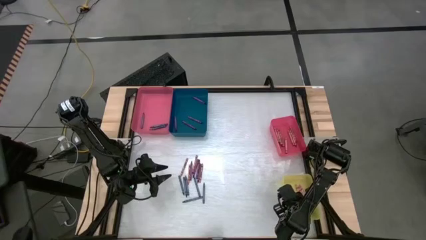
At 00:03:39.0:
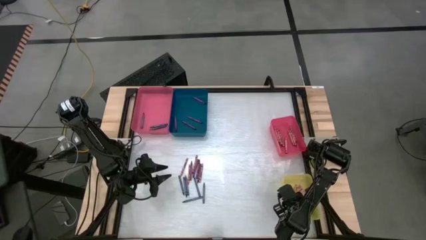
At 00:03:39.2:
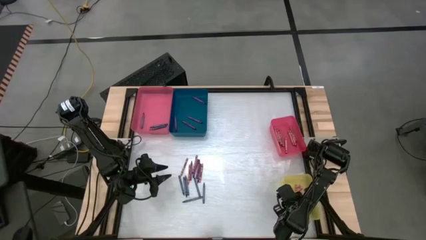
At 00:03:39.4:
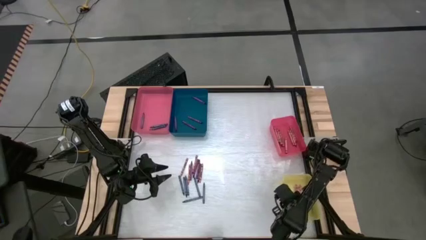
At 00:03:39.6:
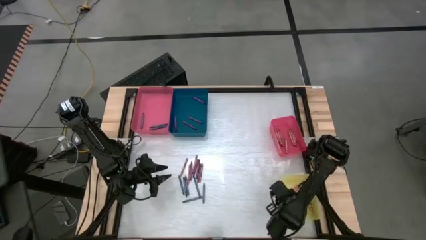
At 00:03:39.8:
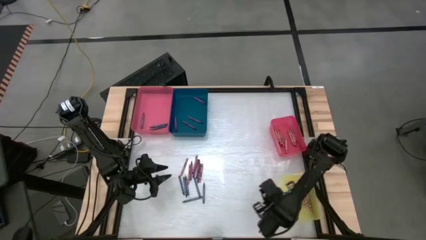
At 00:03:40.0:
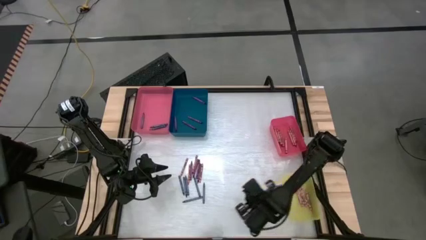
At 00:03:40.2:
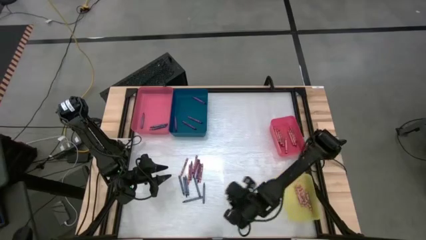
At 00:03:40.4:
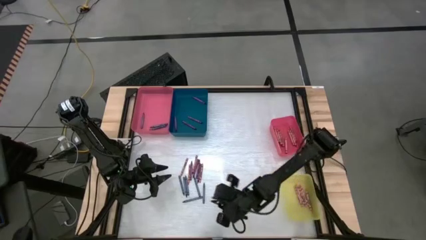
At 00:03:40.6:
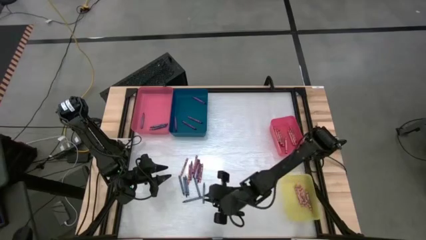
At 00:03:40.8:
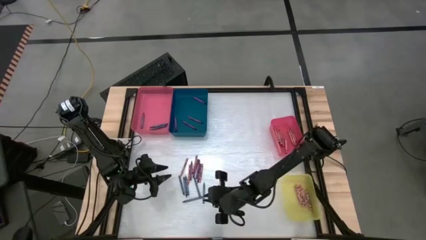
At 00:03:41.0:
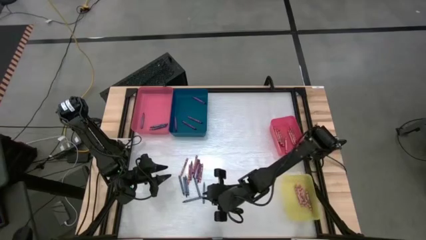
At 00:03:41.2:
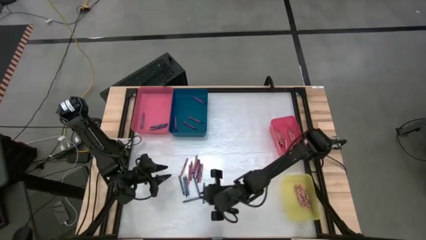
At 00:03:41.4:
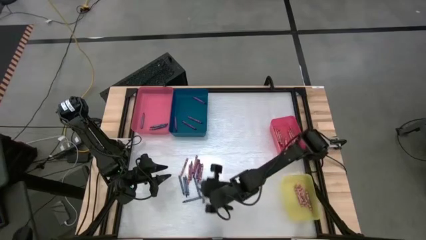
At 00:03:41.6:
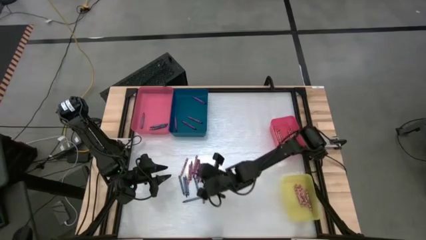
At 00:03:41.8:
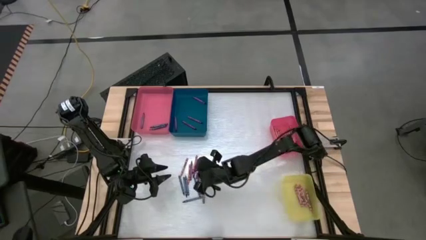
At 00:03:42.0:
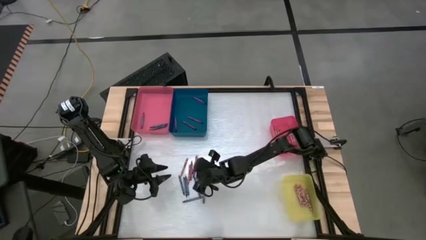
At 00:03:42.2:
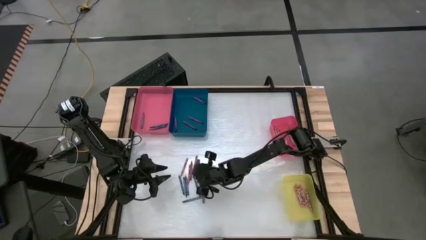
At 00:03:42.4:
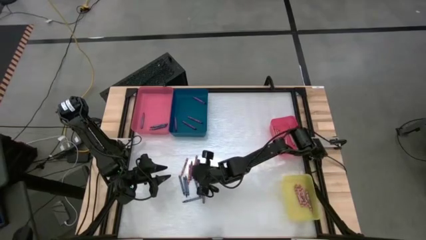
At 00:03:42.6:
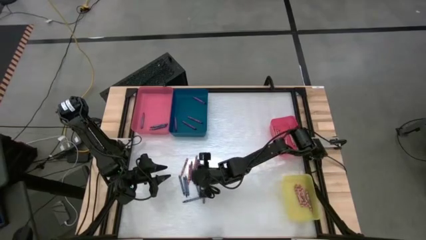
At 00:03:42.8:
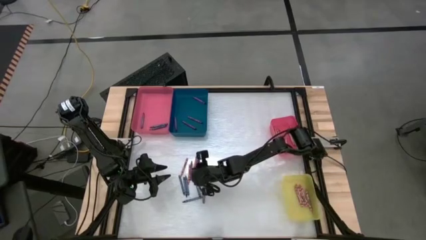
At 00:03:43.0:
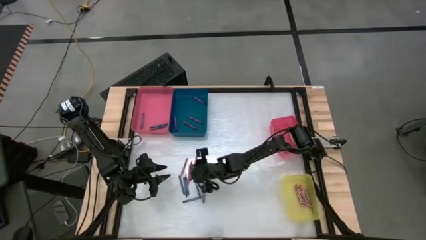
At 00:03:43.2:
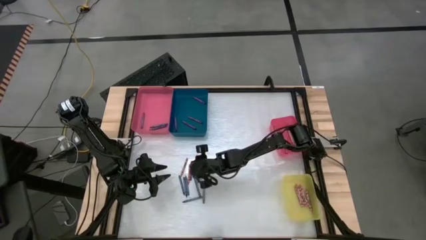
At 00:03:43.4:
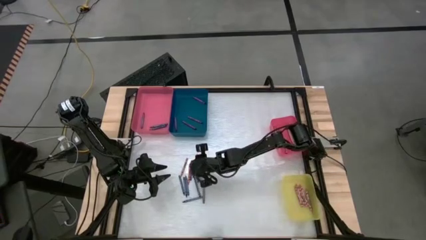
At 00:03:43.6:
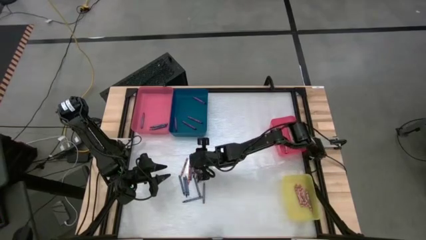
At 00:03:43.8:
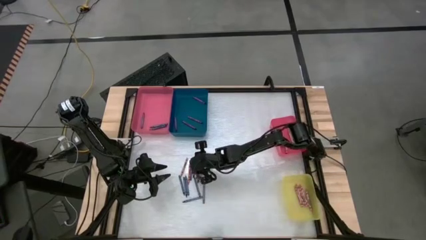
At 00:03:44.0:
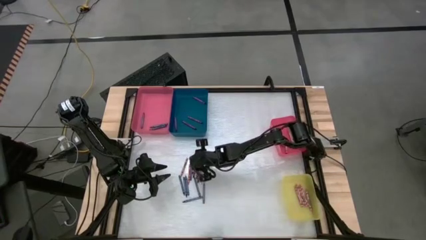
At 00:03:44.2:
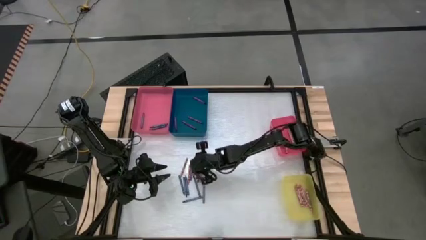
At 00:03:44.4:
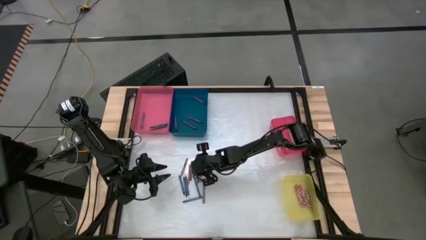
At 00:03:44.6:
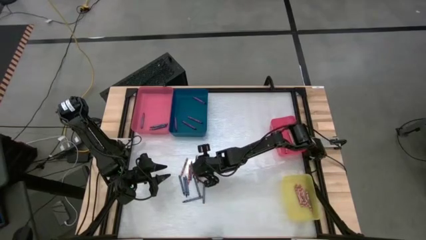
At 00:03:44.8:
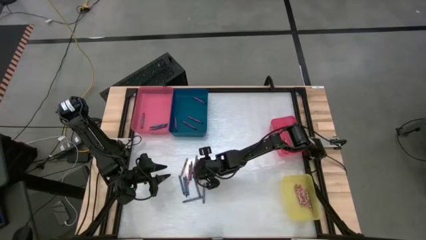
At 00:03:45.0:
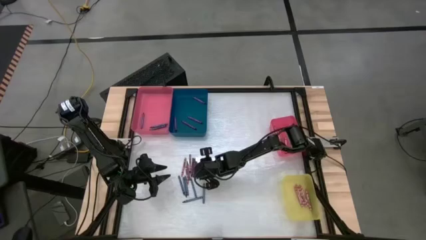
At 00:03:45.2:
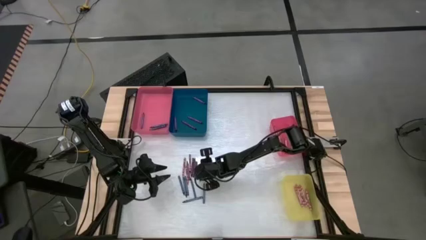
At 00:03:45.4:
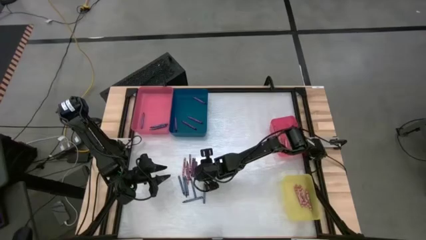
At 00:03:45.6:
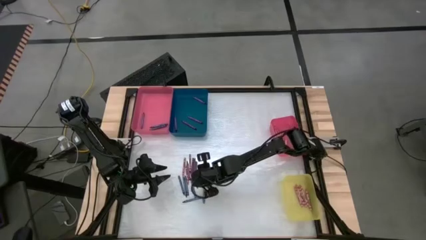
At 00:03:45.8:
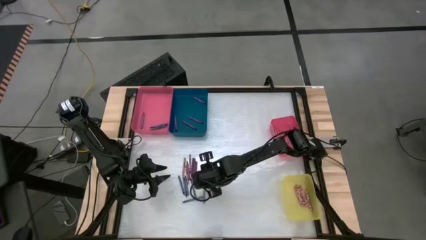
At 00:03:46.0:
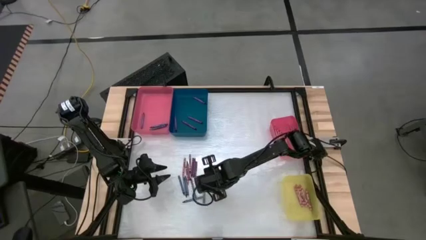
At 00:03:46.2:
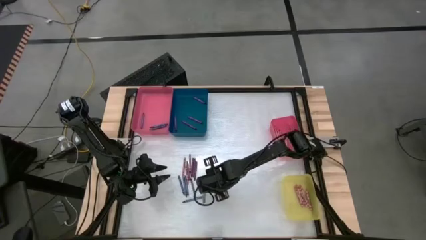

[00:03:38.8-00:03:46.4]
Task: Sort crayons
Put the pink crayon into the yellow bin

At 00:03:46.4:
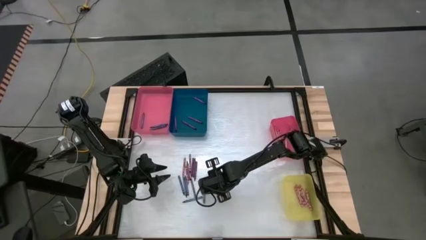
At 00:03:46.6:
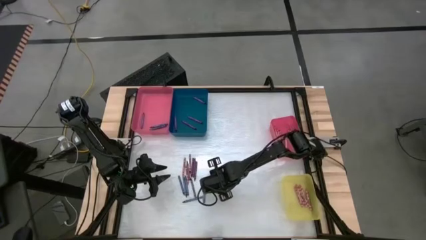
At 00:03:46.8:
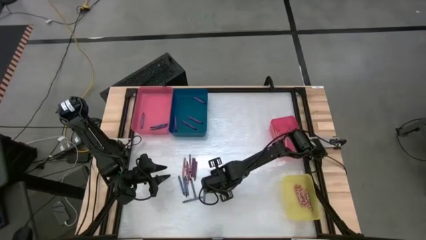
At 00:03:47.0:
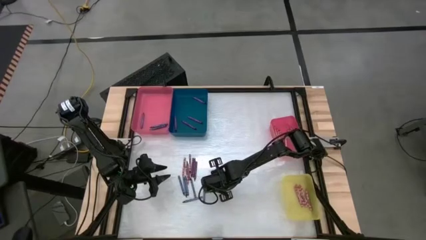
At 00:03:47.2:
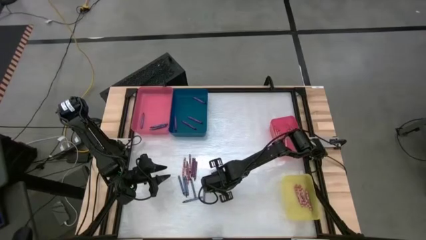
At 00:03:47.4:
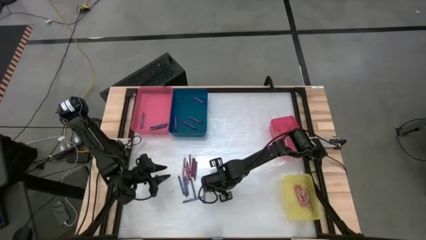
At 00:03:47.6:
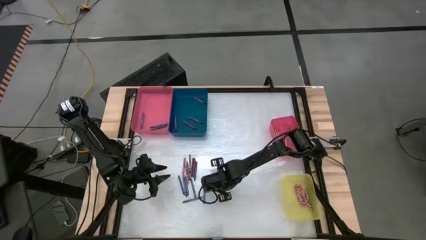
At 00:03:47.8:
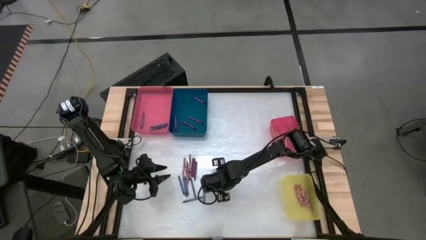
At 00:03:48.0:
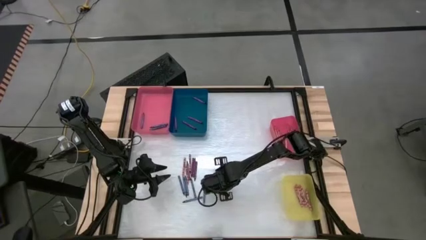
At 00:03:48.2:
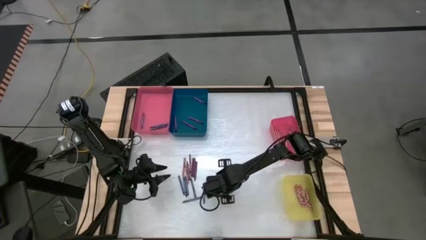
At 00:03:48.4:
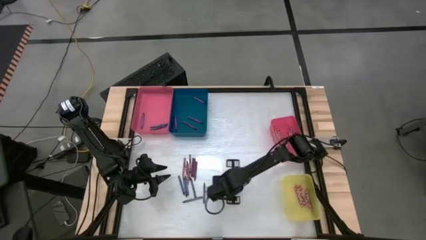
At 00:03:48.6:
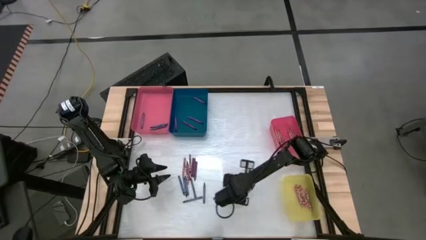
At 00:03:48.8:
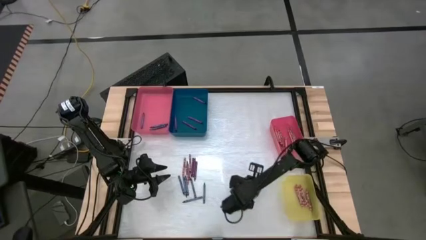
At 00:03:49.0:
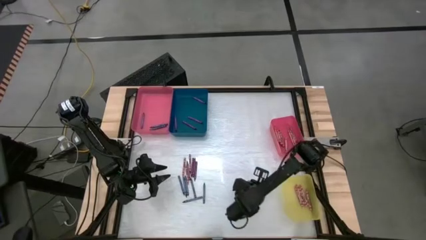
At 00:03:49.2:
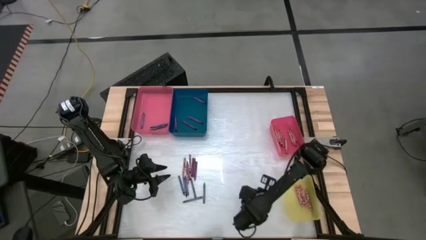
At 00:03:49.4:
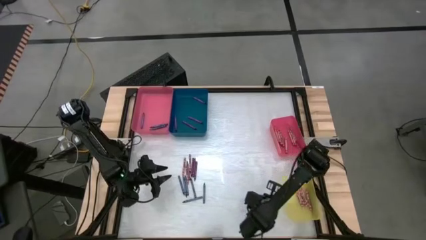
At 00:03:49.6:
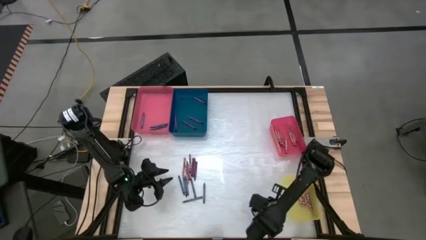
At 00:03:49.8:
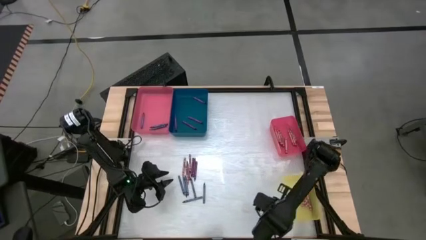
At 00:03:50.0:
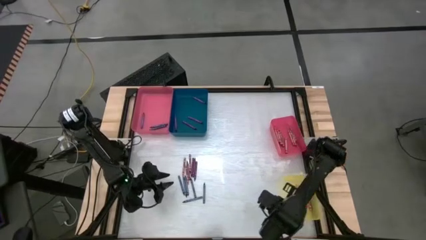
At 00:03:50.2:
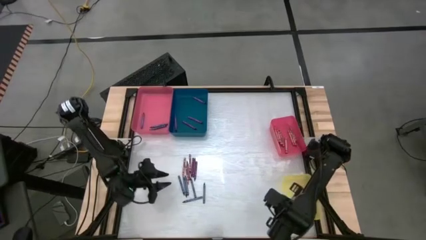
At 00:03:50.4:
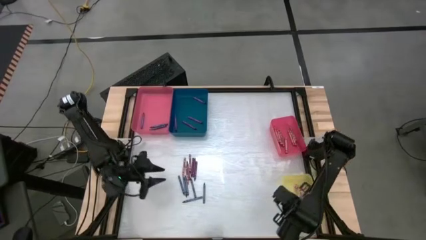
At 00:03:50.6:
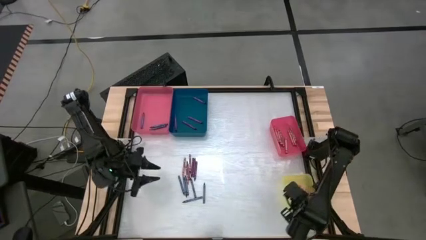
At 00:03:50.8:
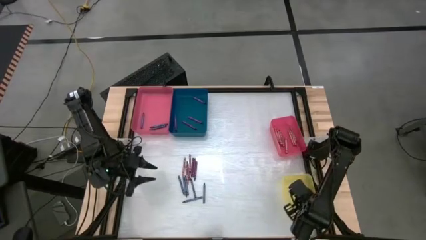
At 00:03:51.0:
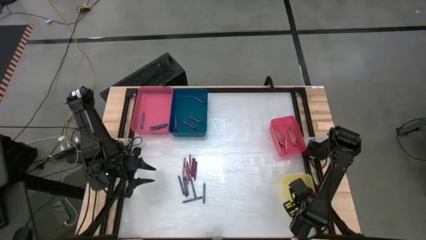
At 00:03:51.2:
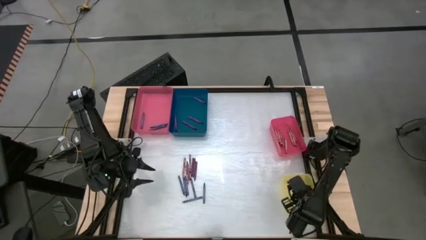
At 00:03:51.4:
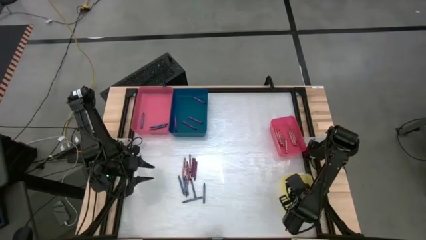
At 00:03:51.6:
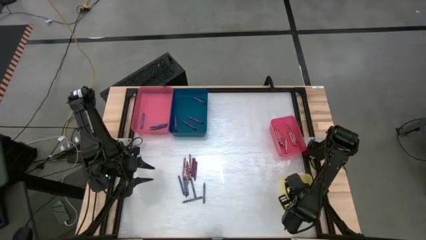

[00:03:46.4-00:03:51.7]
Put the pink crayon into the yellow bin
